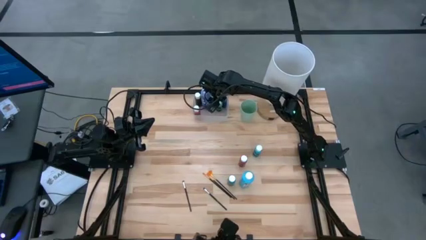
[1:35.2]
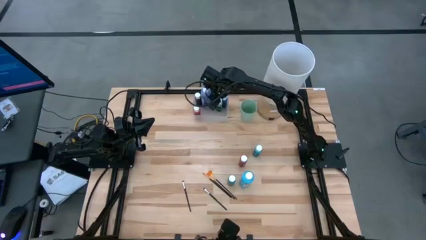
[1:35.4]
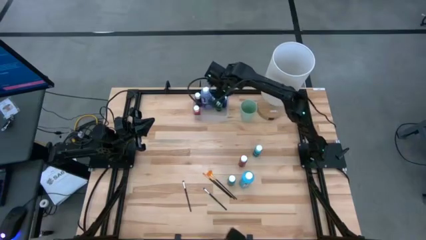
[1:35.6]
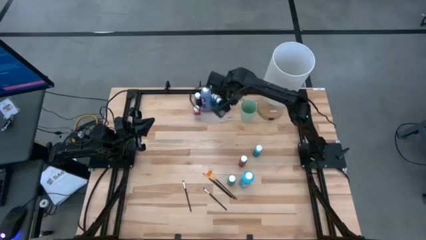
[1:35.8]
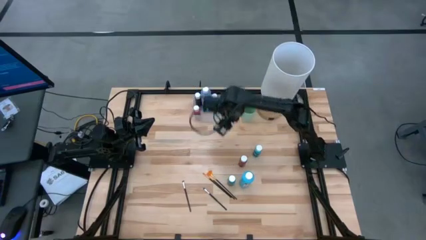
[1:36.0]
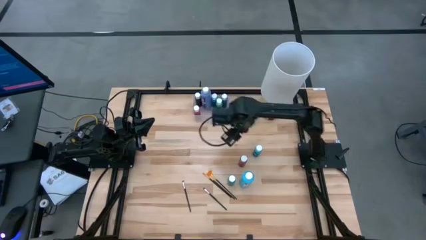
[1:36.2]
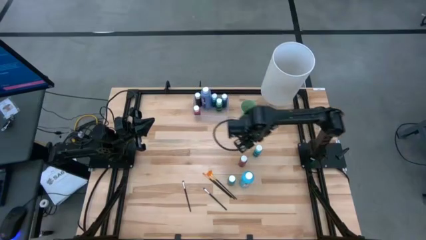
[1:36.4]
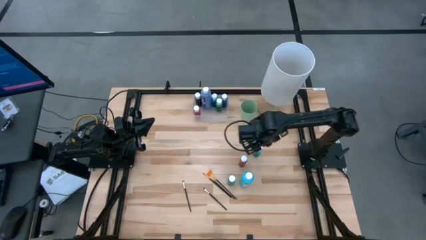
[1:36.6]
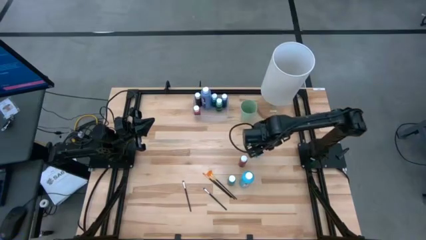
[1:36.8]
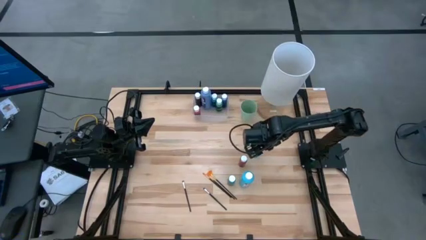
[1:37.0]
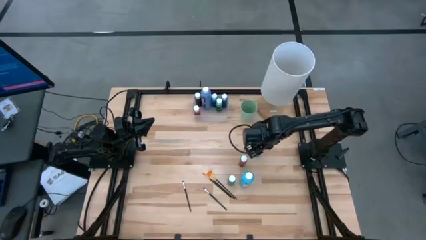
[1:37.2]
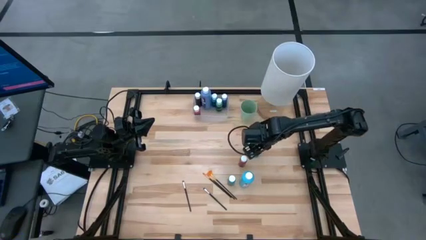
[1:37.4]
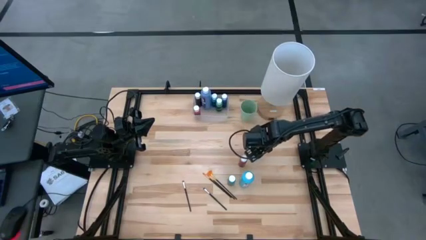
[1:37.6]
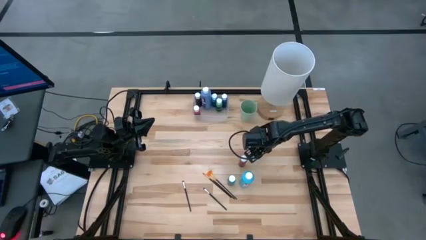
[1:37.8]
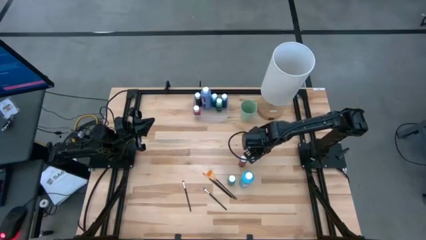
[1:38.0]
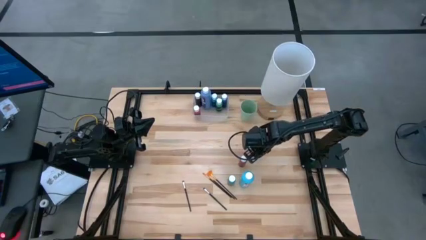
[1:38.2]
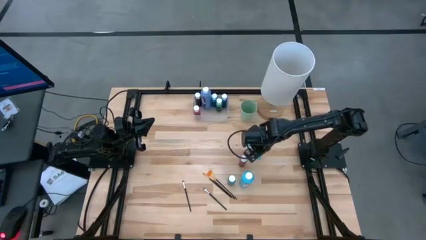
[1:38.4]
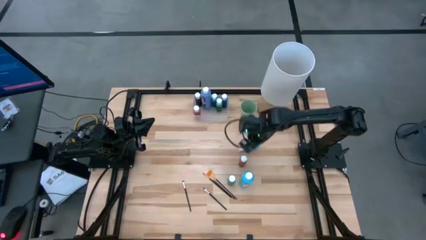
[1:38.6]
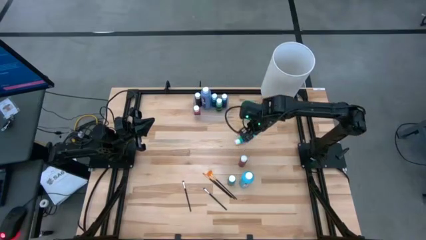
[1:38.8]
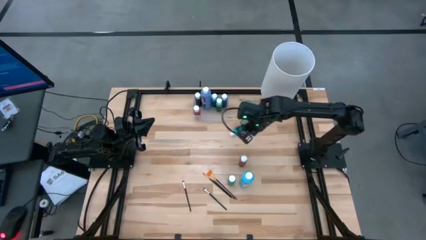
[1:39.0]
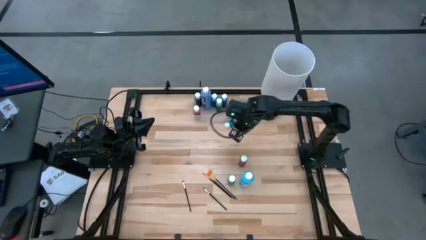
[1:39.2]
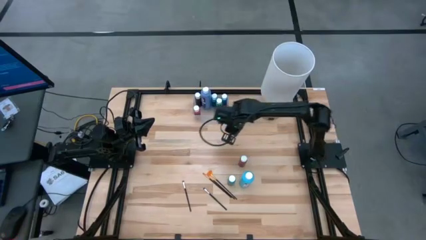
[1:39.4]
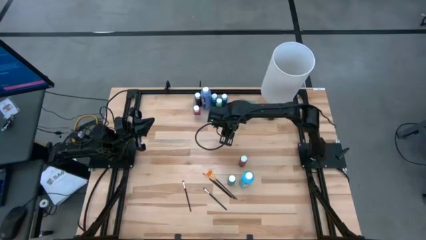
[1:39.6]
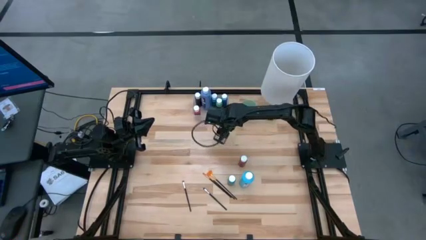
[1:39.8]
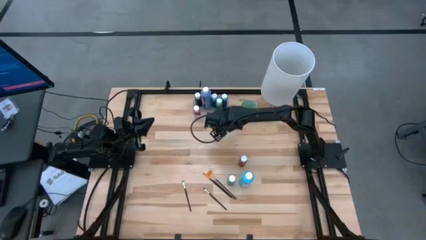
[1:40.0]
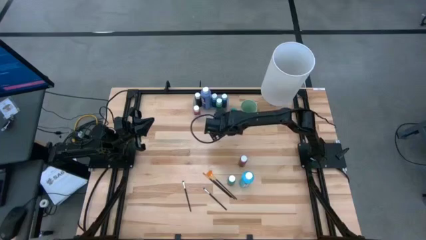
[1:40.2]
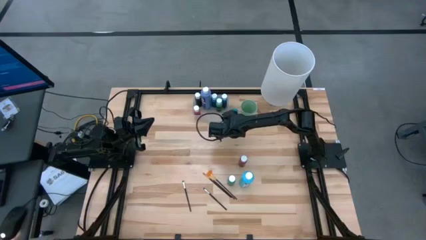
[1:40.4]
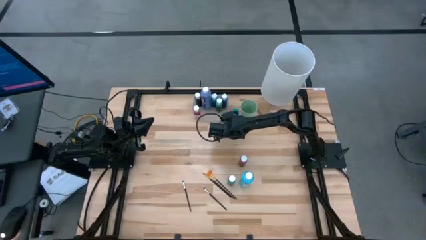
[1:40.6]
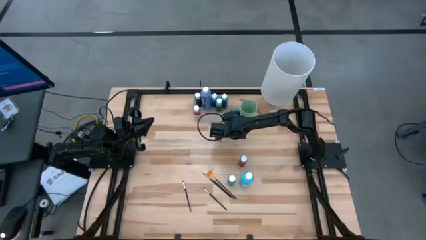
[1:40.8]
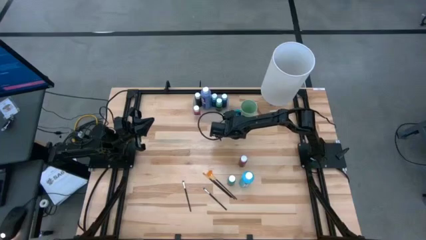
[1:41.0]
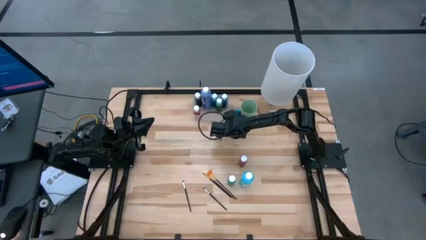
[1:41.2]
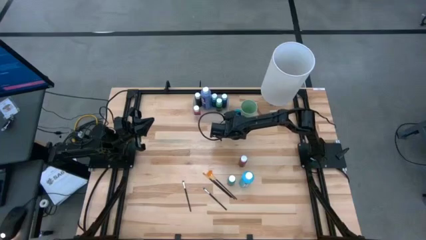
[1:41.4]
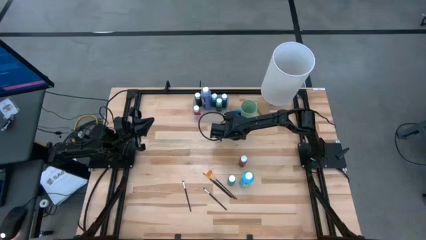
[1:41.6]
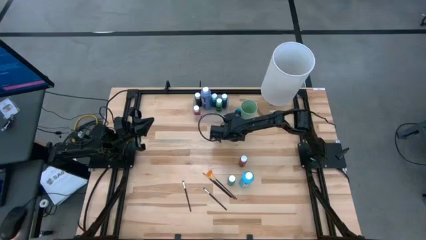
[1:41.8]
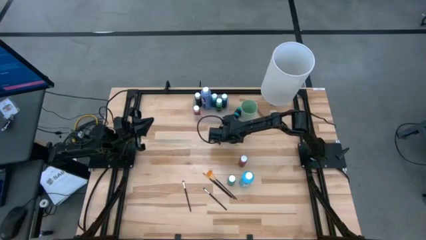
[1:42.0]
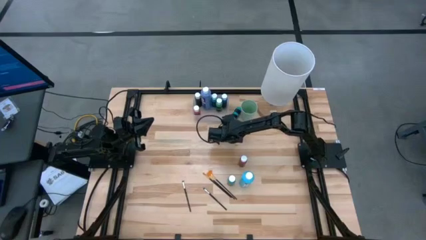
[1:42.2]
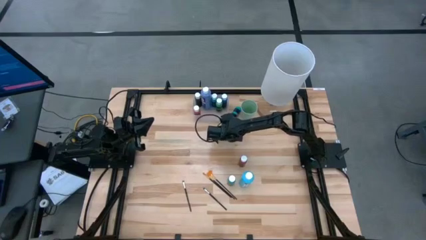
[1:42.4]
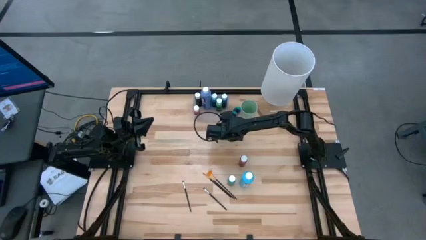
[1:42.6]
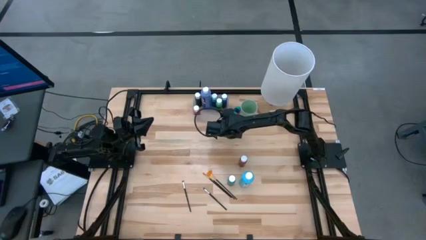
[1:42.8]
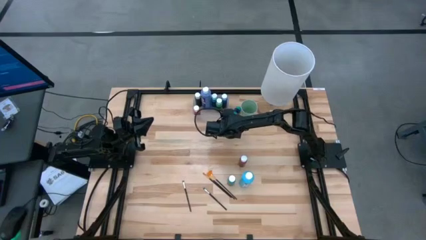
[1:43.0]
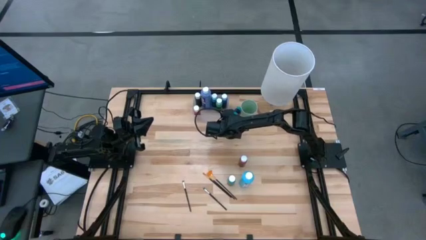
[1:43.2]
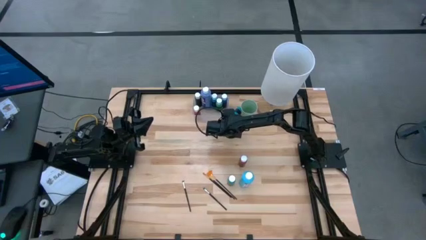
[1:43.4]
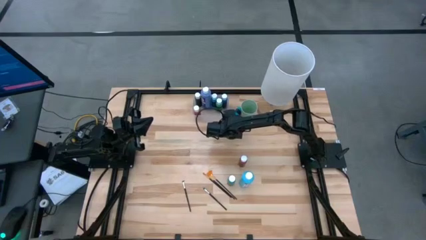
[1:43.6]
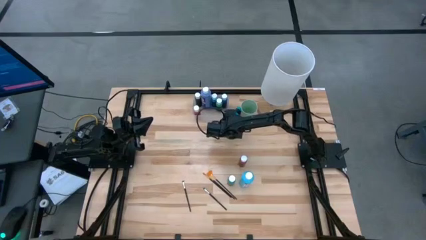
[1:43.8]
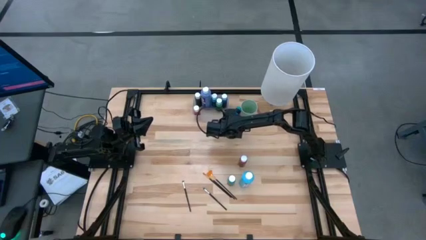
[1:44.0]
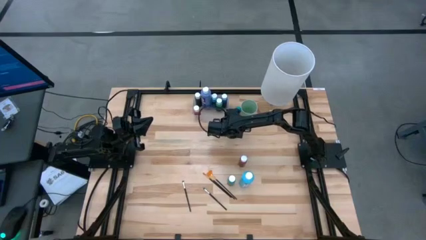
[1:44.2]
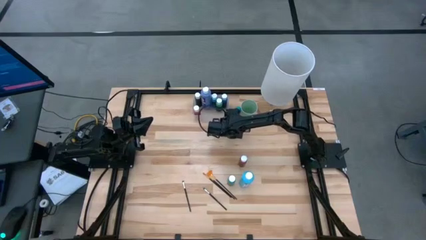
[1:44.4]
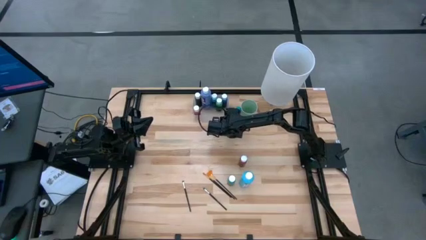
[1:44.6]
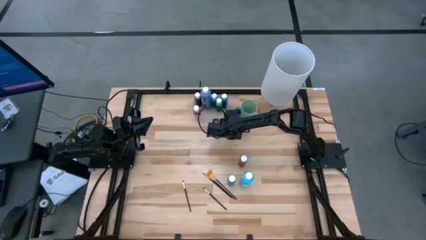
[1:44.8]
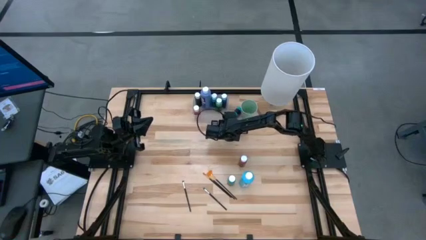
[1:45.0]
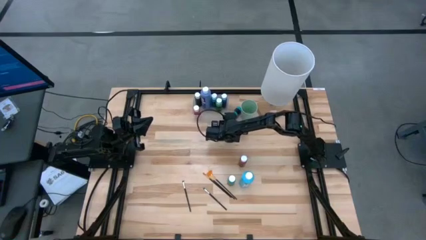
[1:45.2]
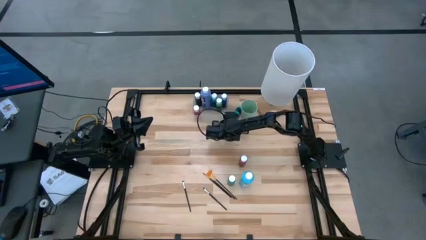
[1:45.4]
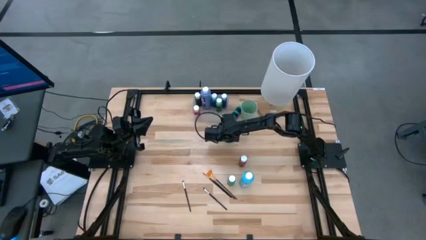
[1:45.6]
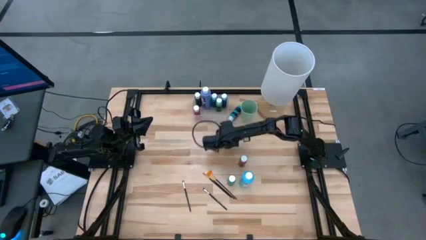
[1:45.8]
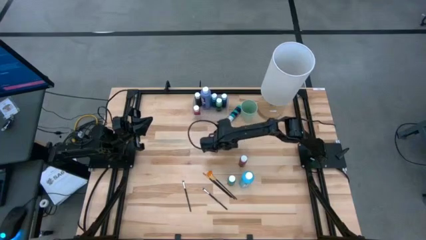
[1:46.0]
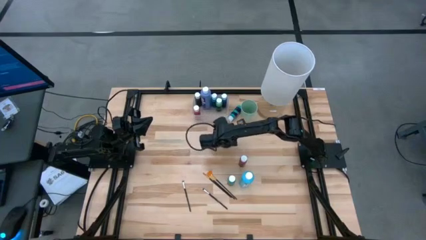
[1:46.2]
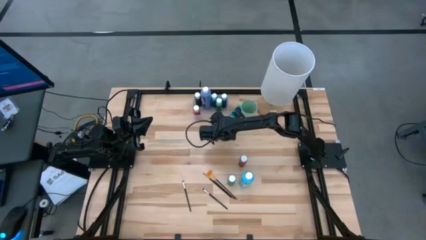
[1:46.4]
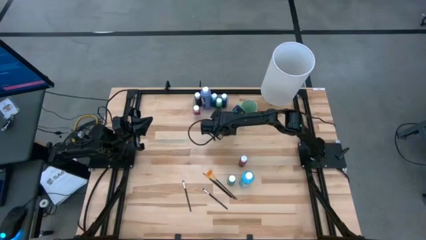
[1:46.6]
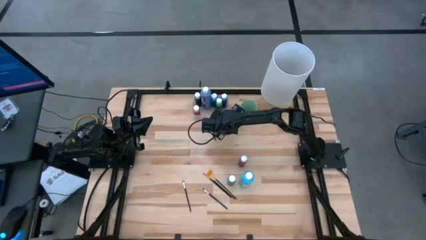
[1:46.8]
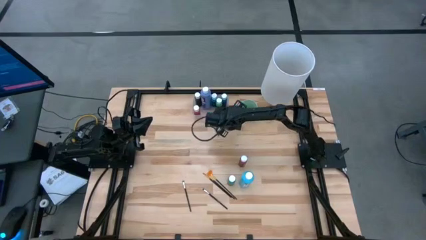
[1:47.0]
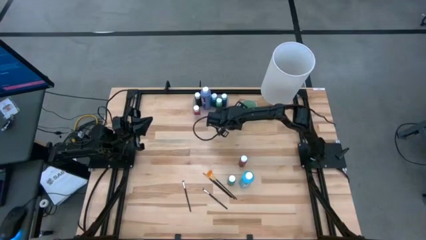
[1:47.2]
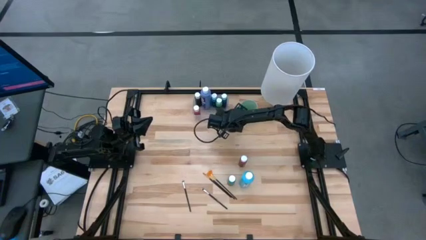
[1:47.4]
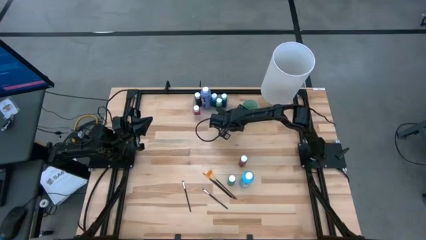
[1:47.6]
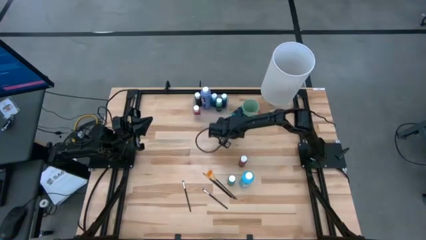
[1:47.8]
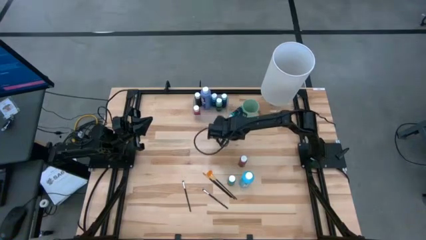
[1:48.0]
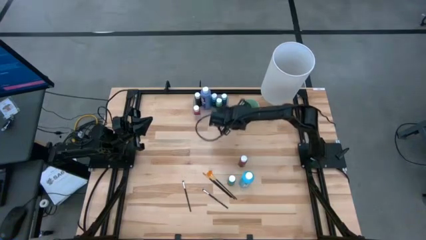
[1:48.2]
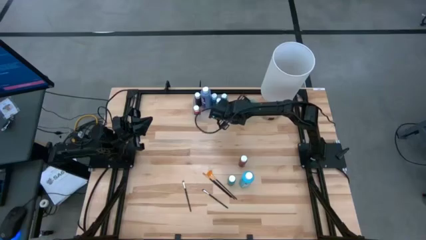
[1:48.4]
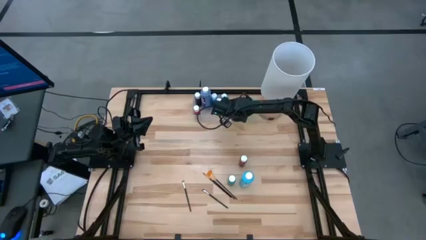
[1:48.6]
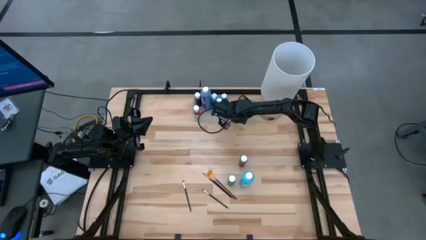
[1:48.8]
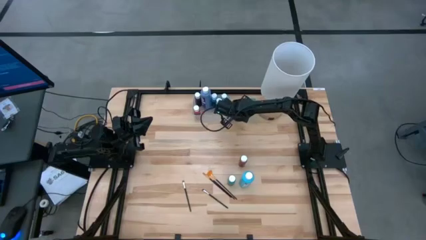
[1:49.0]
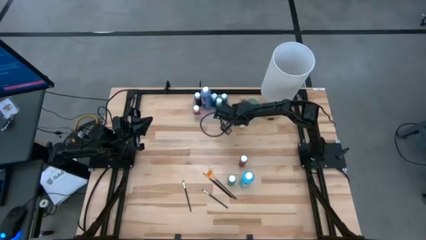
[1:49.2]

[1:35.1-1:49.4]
Task: Pick & Place Paint Supplies
Put the top light blue paint bottle into the transparent bin
